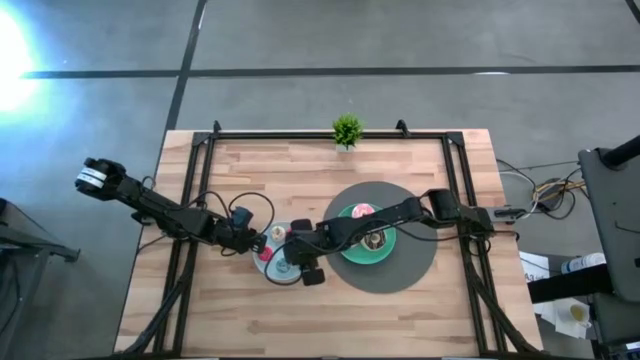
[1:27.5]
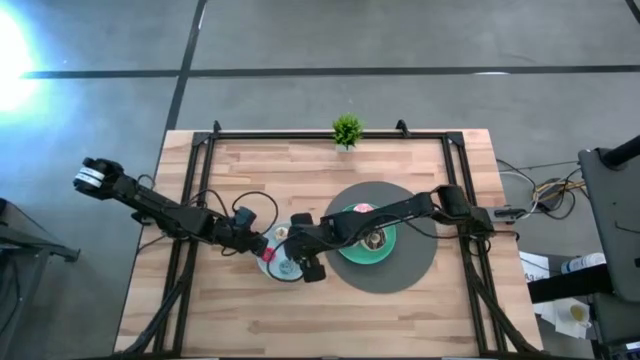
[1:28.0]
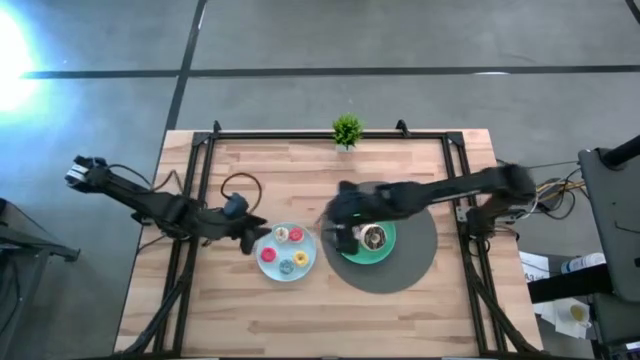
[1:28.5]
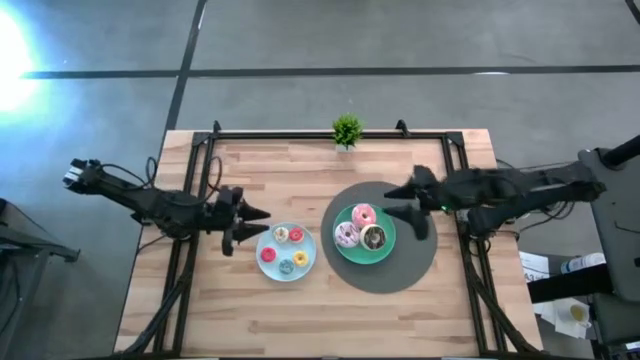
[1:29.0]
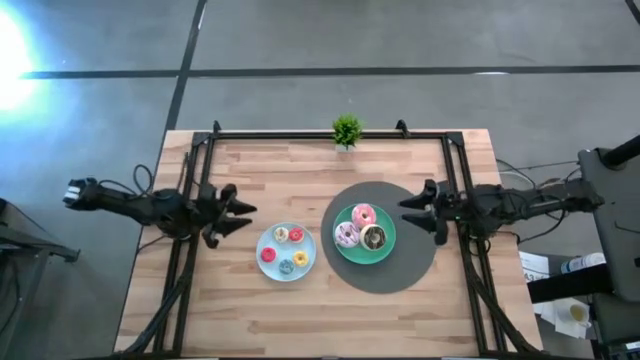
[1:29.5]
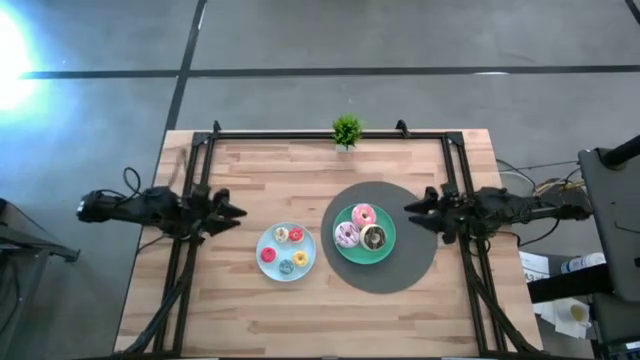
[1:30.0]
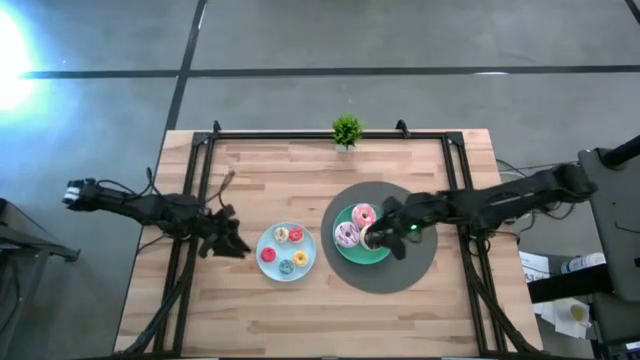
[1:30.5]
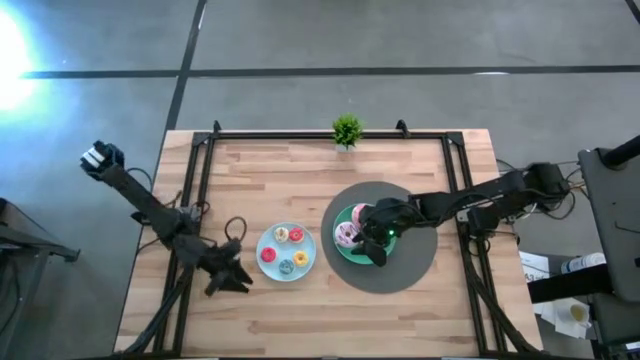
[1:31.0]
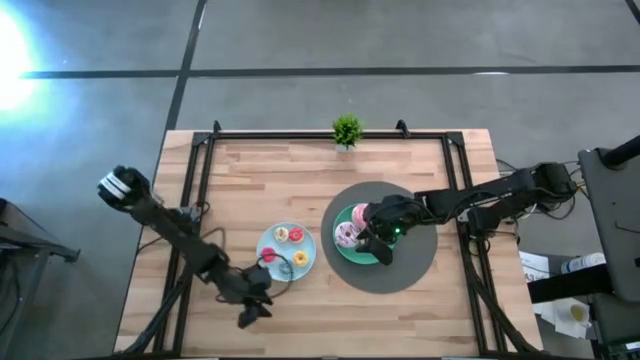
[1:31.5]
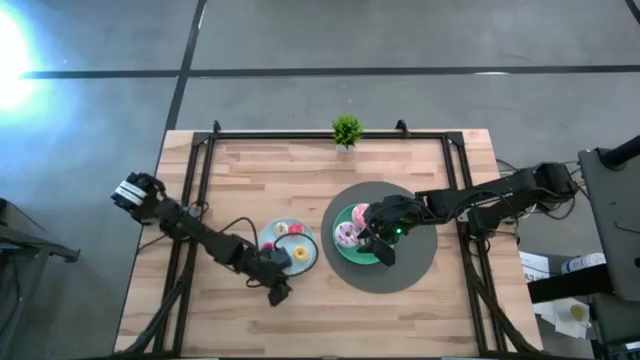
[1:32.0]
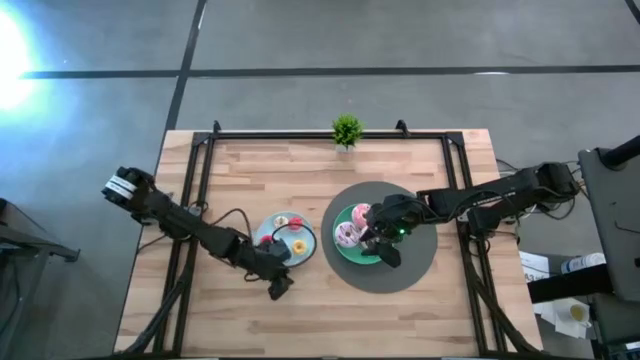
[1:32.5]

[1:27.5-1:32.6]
Task: Pick & Place donuts
Adjust the the light blue plate on the table to align the position

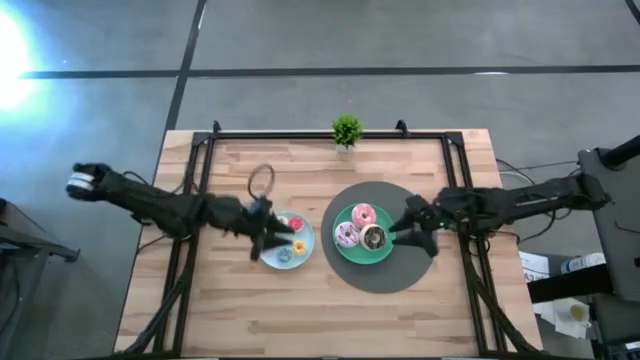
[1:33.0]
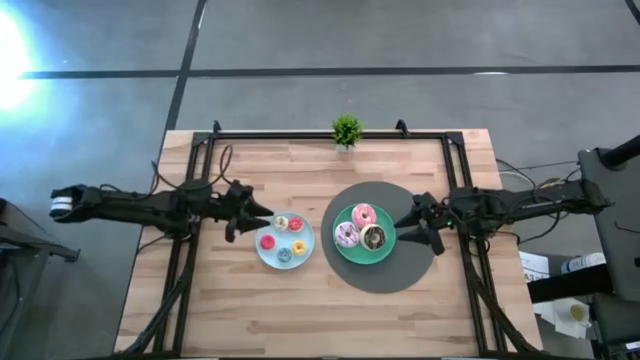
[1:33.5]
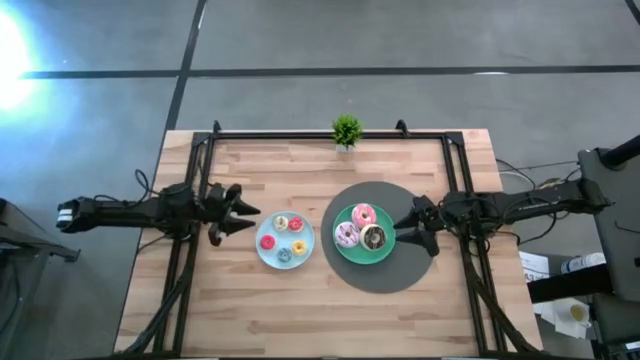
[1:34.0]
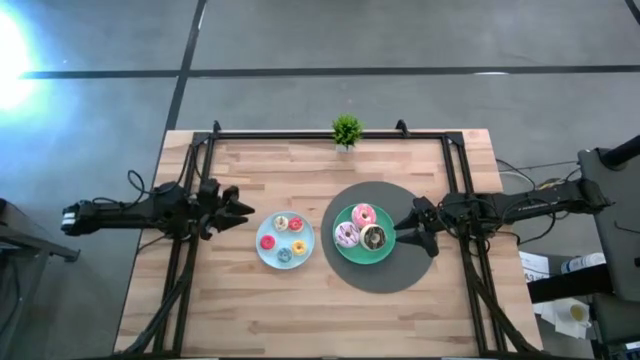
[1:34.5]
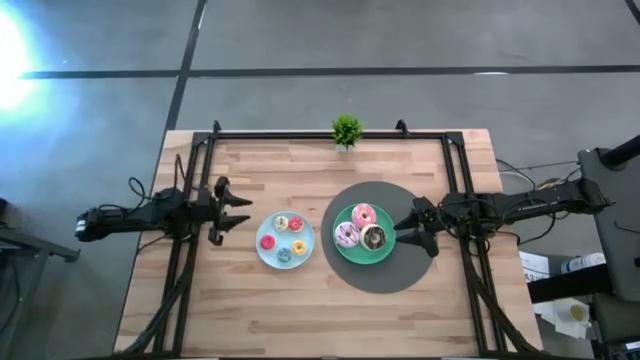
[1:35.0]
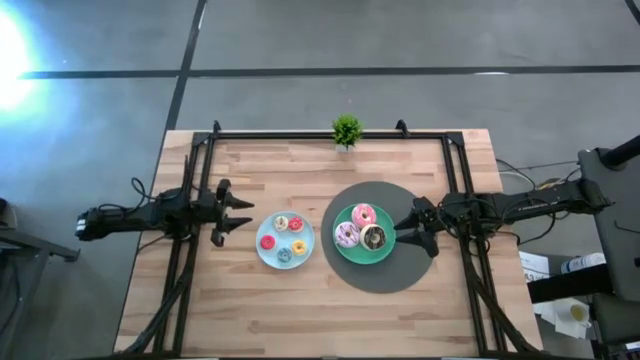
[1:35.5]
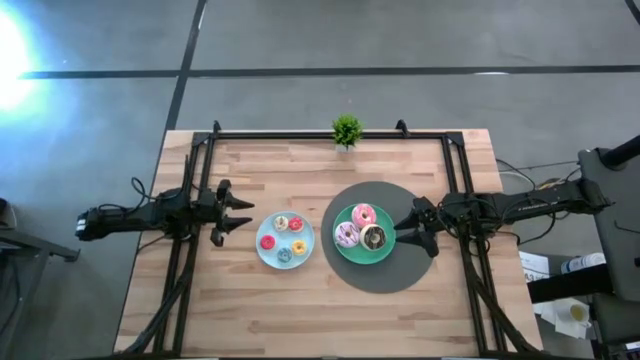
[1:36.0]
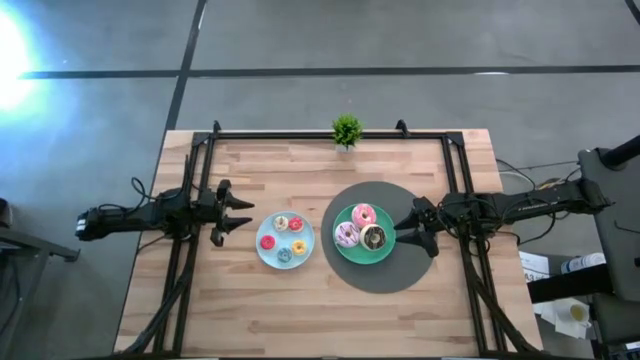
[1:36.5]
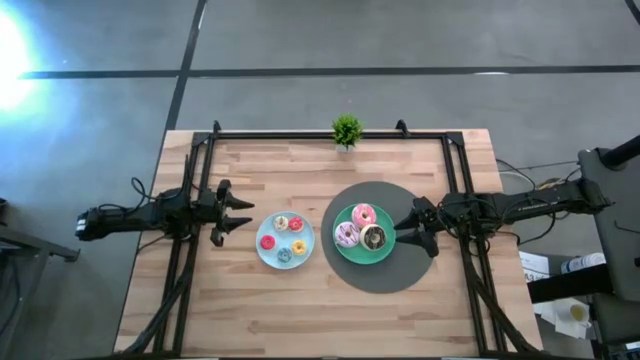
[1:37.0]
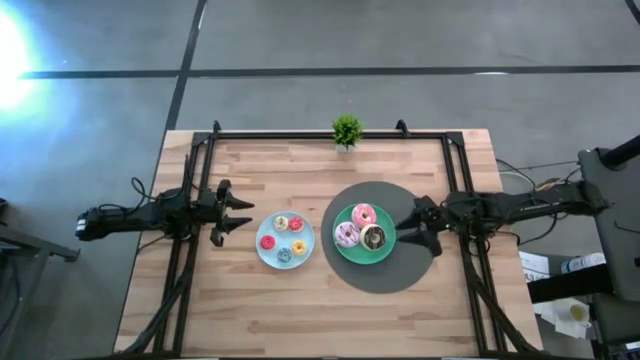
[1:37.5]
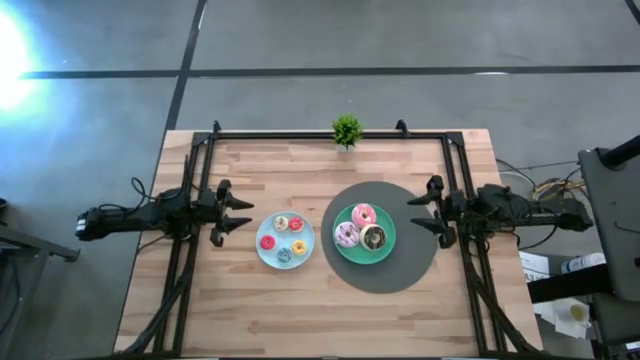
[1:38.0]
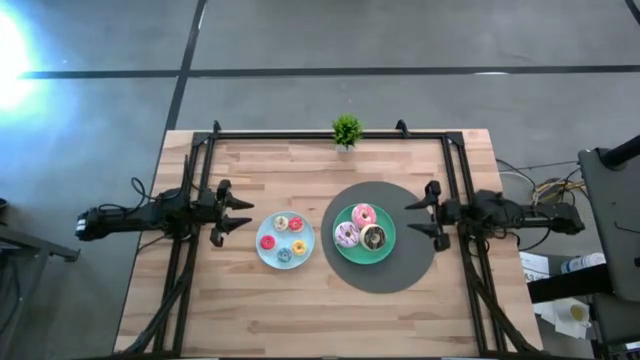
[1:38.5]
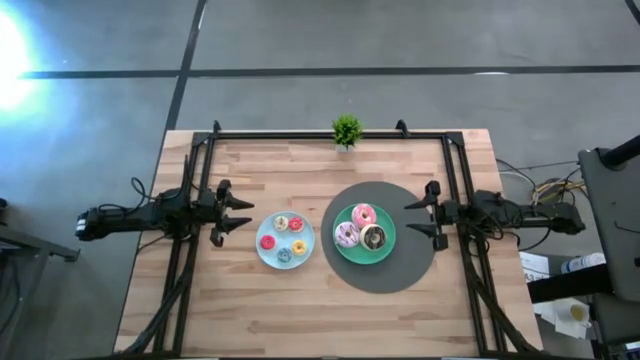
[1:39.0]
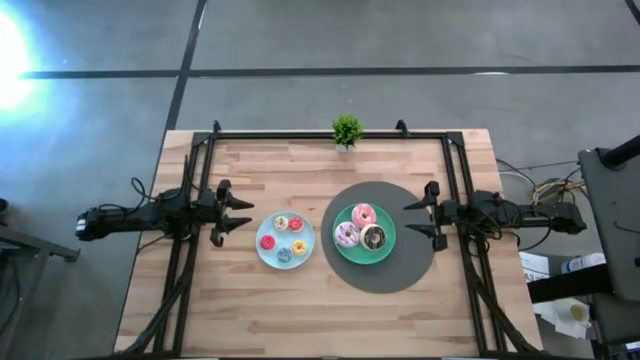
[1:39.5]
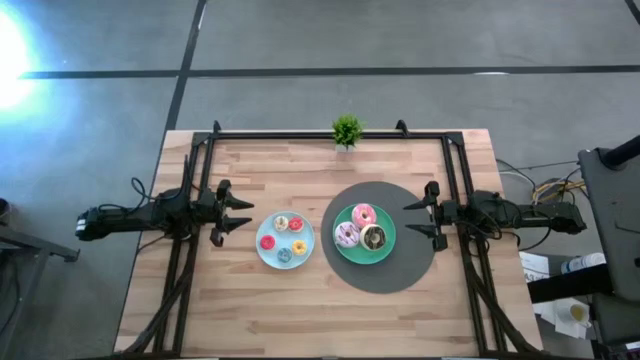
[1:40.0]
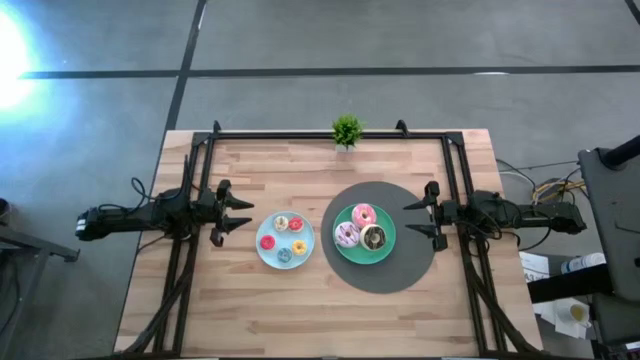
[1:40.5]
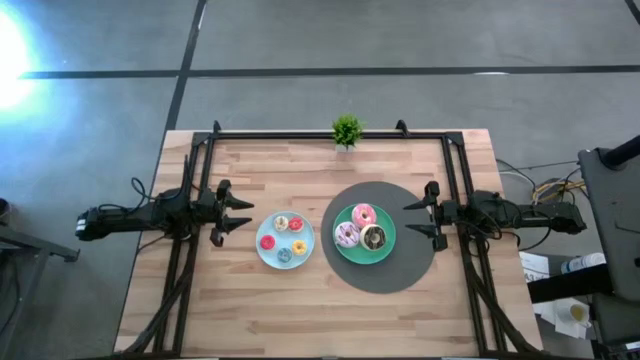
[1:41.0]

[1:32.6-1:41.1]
Return to Home Position

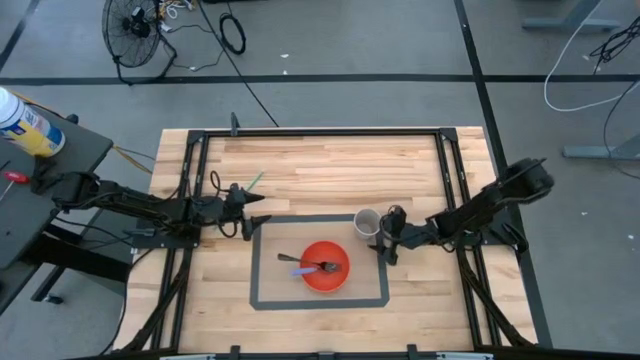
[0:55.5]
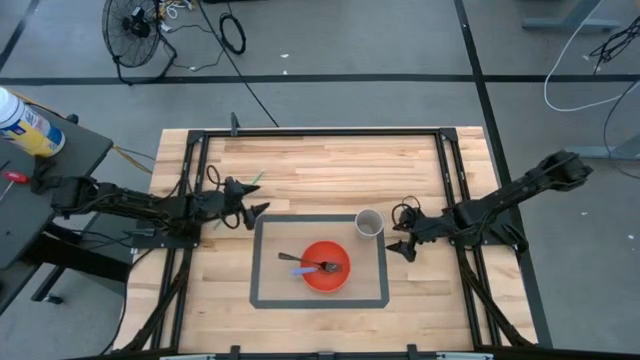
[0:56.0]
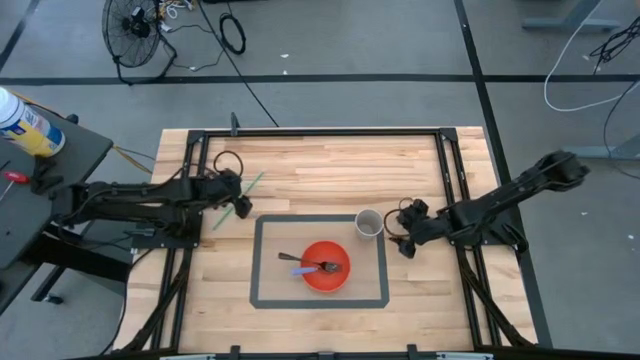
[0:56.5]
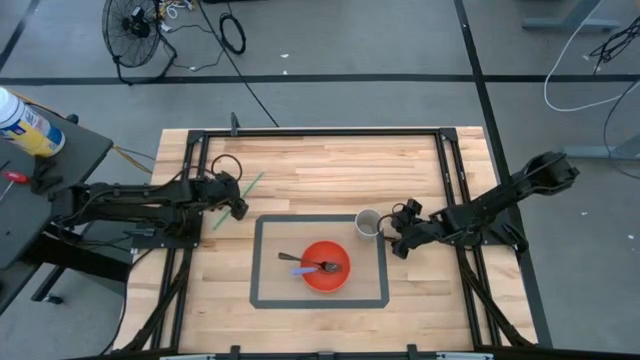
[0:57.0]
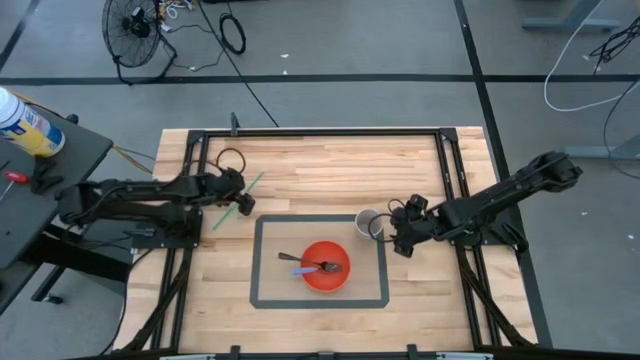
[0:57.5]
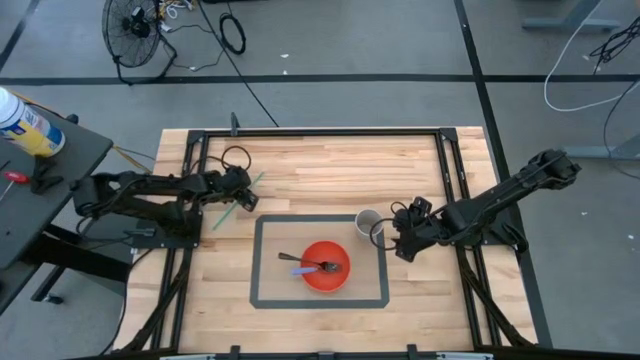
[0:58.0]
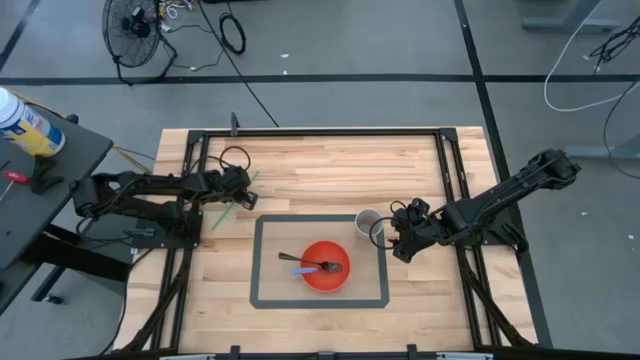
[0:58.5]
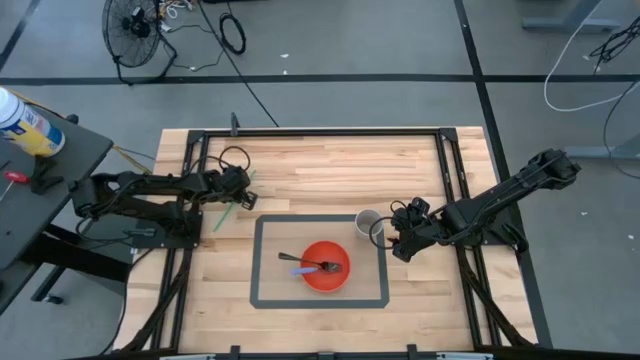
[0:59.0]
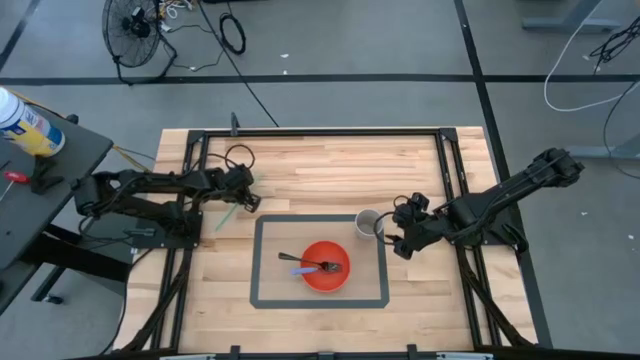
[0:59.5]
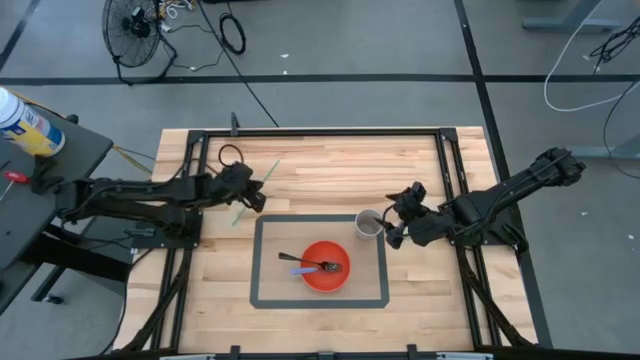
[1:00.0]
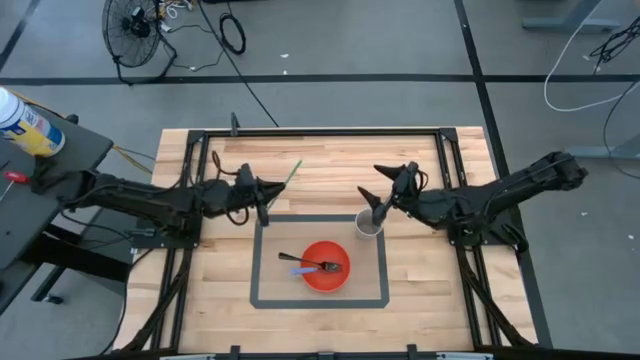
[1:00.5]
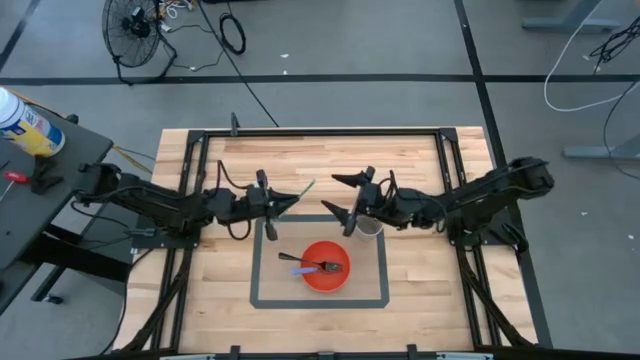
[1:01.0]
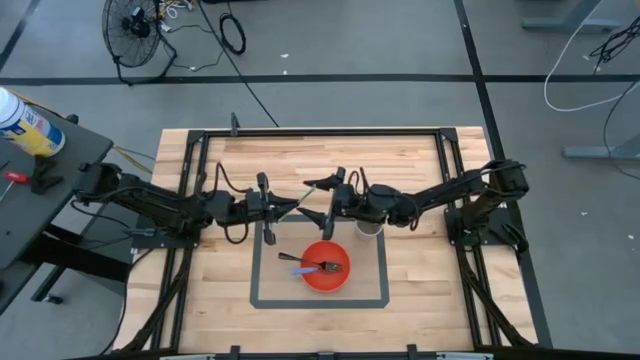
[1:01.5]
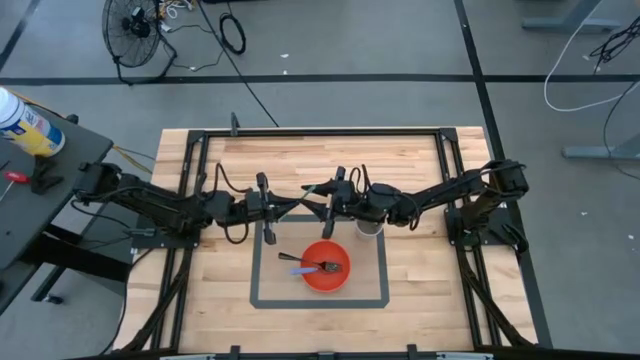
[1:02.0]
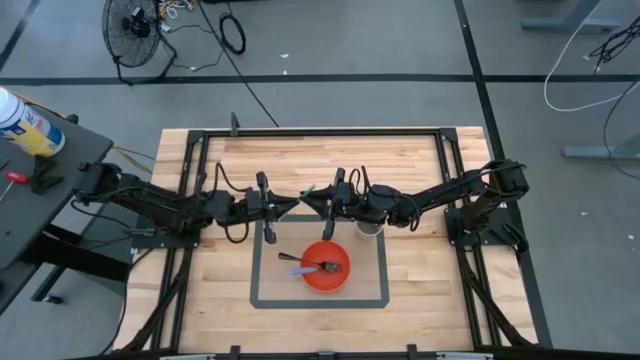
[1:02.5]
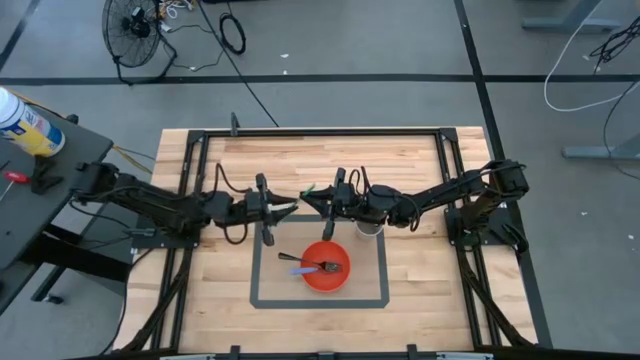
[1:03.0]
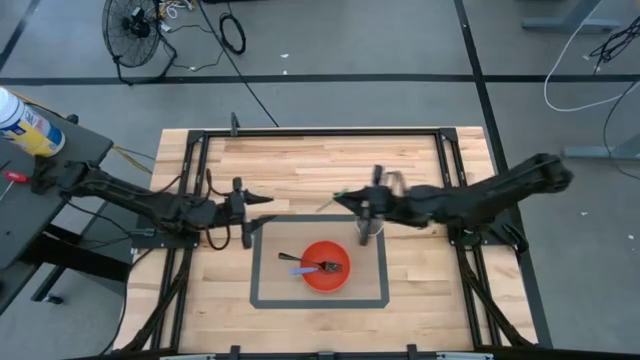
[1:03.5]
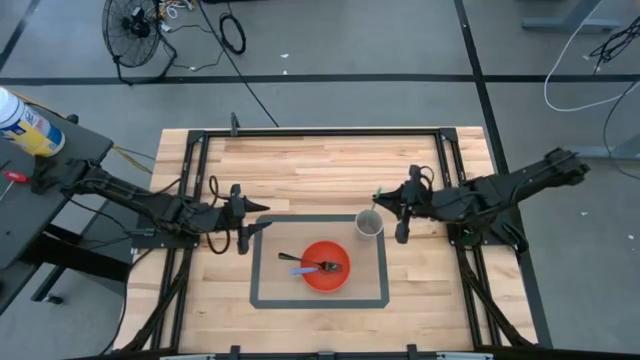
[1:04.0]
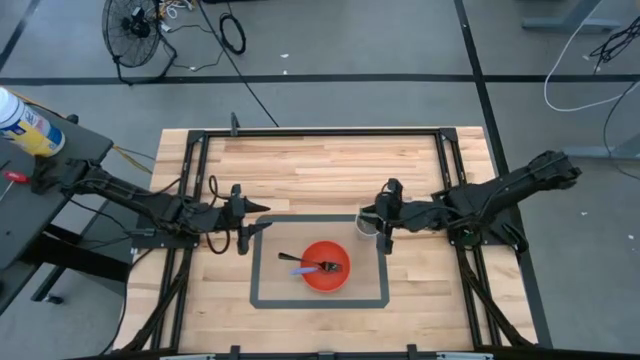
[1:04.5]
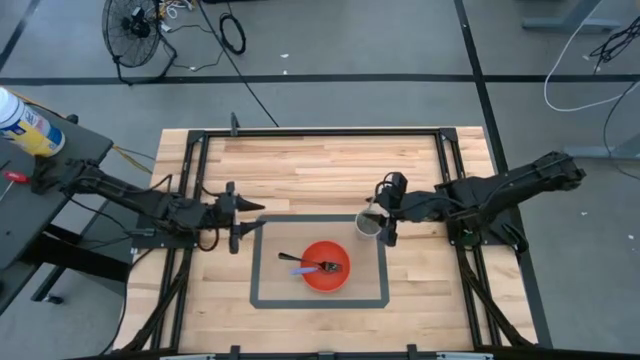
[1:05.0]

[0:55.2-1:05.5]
Task: Pick & Place Utensil
Put the green straw into the white cup on the brown mat
